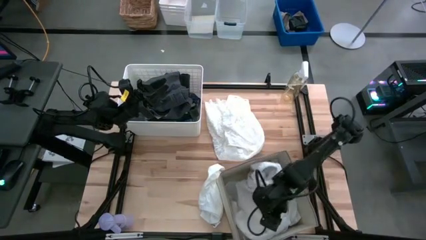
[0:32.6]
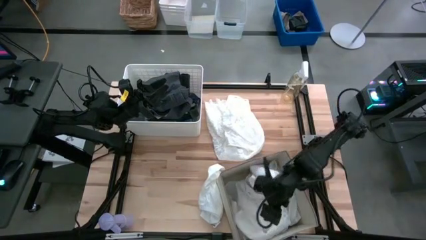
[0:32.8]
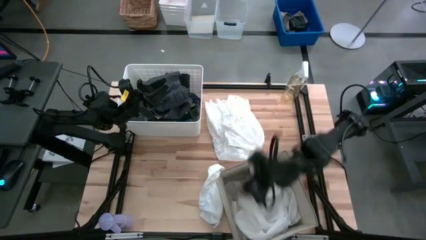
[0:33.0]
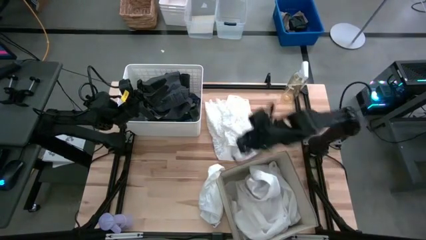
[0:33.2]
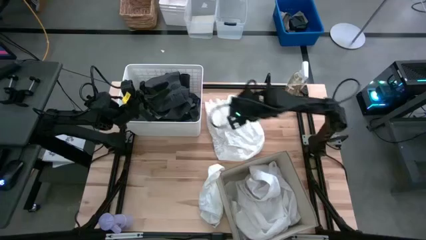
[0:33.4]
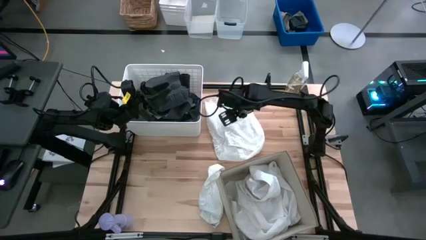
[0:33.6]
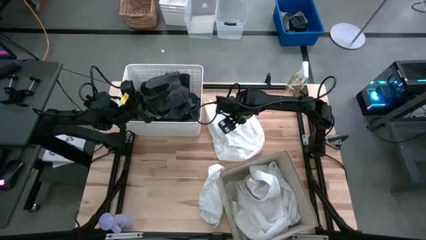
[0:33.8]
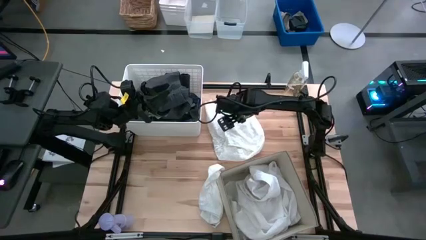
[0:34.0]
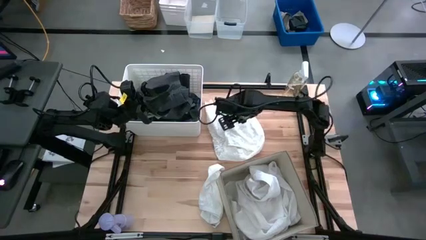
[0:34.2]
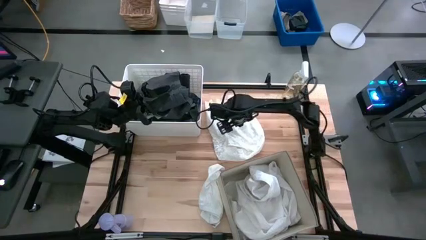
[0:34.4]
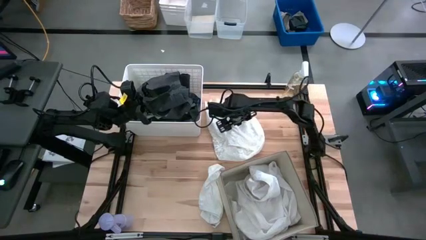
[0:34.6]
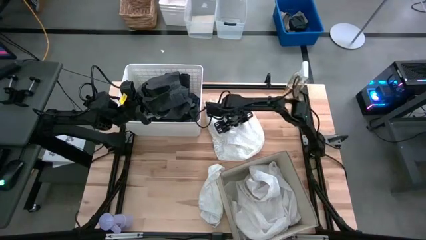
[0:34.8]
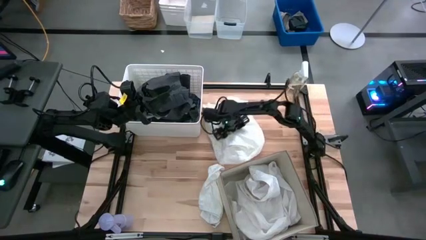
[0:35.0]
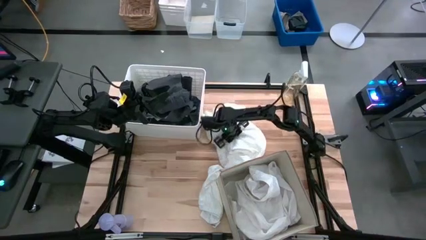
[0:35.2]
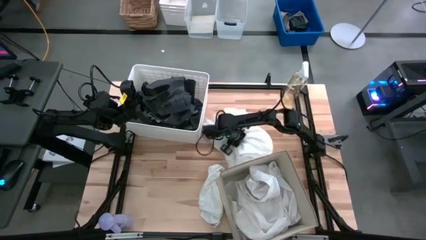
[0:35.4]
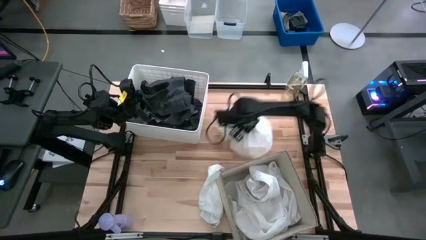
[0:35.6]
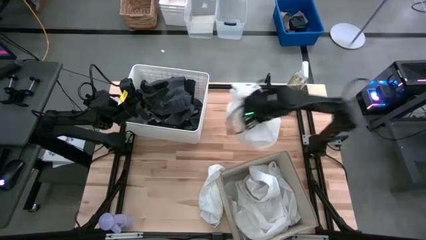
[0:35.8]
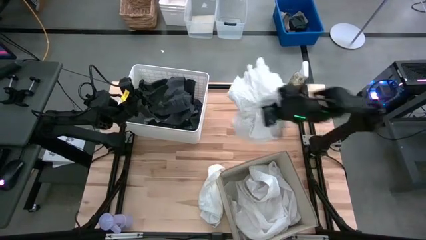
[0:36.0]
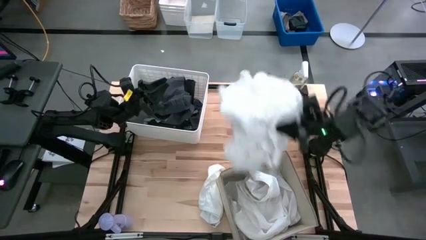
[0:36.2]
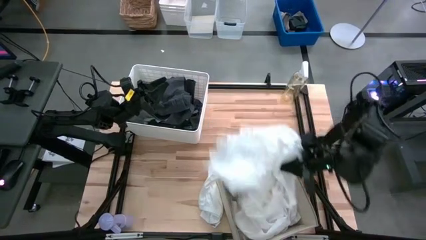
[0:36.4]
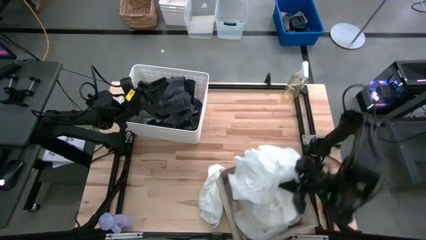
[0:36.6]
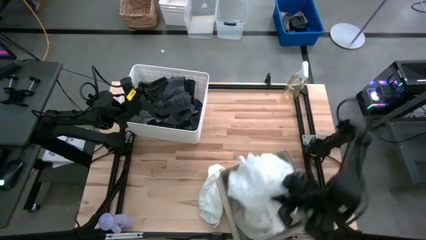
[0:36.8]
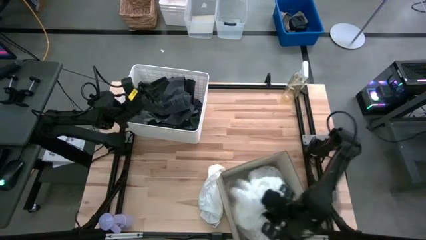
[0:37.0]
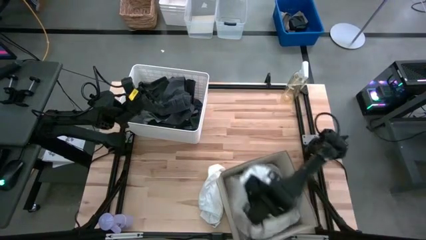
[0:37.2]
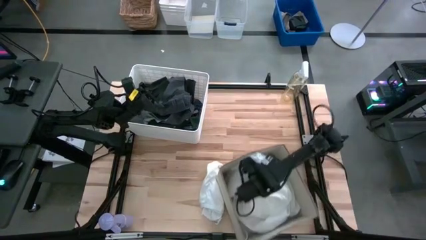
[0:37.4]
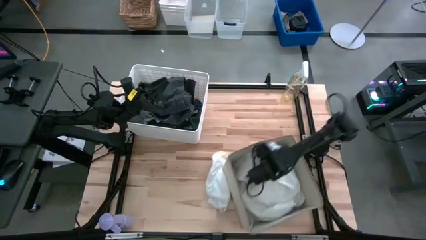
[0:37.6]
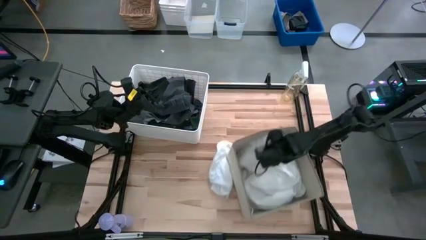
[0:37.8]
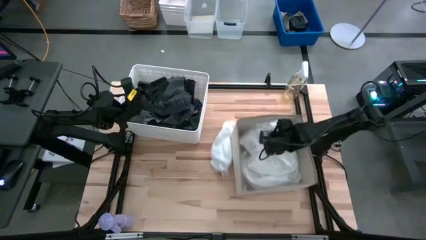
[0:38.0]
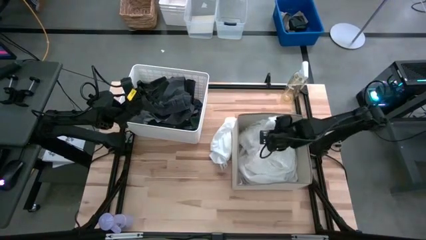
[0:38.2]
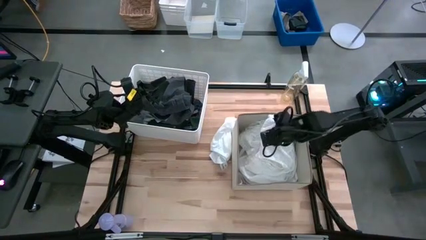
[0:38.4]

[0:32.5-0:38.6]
Task: Sort clothes
Put the white shirt into the bottom white laundry organizer

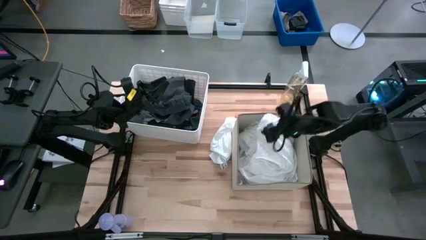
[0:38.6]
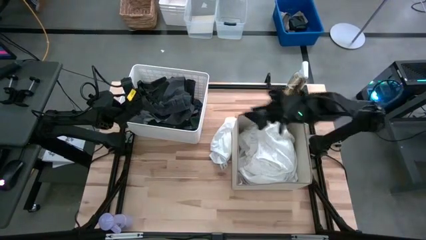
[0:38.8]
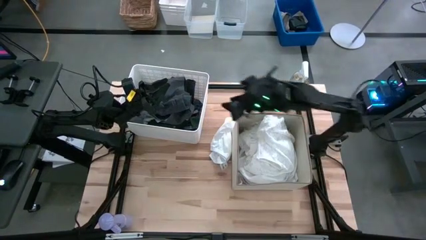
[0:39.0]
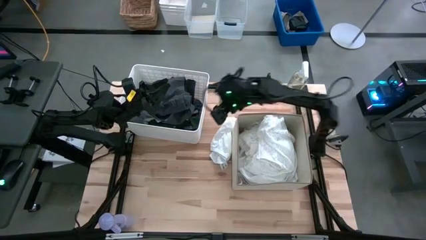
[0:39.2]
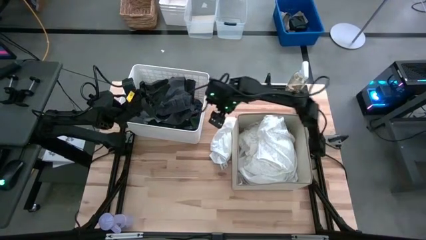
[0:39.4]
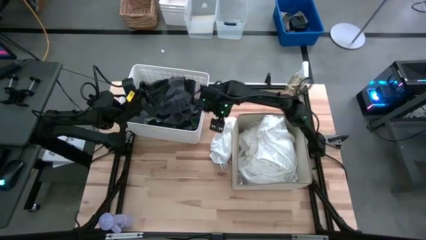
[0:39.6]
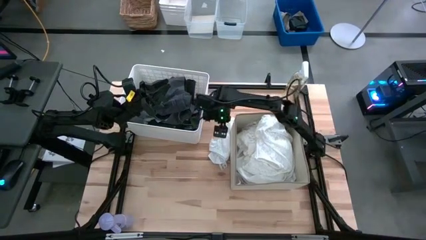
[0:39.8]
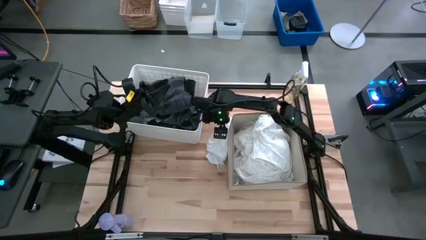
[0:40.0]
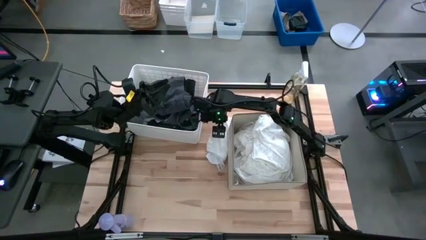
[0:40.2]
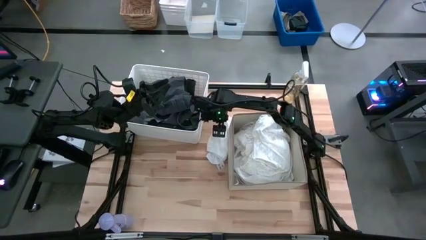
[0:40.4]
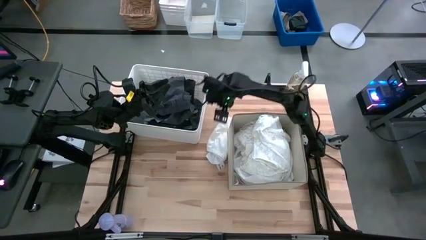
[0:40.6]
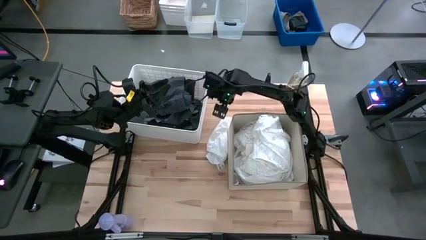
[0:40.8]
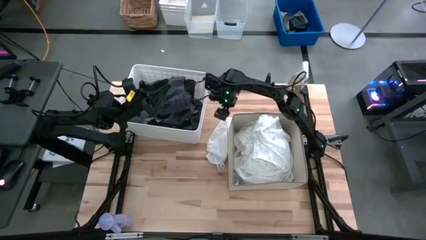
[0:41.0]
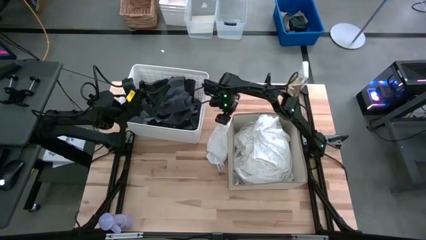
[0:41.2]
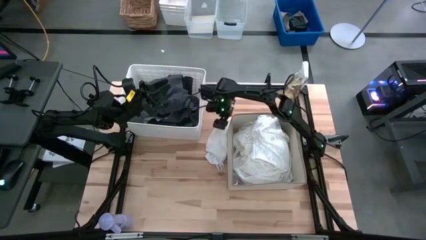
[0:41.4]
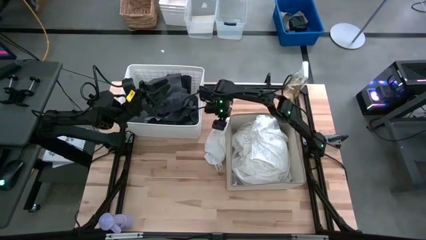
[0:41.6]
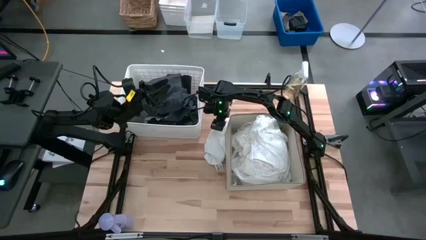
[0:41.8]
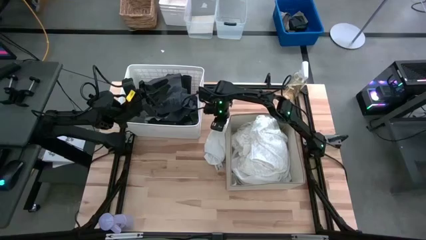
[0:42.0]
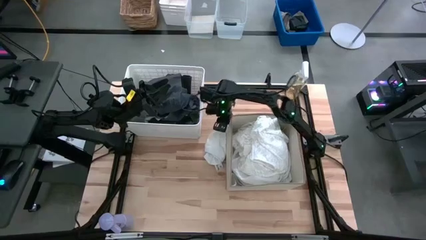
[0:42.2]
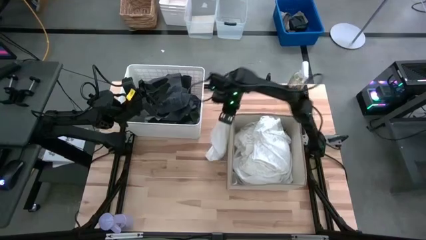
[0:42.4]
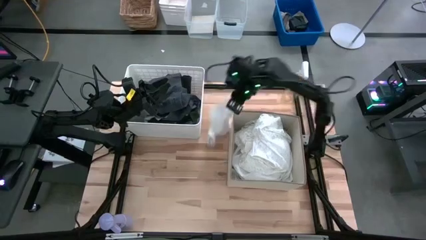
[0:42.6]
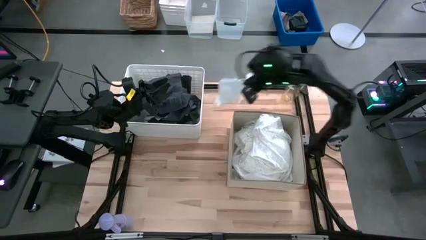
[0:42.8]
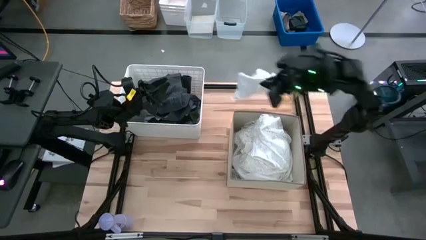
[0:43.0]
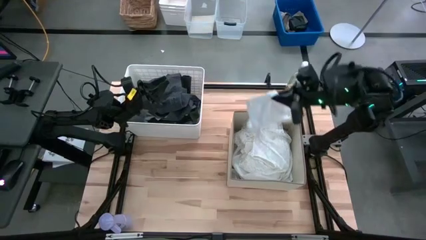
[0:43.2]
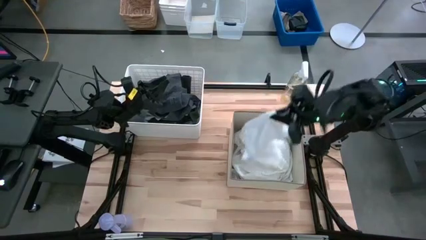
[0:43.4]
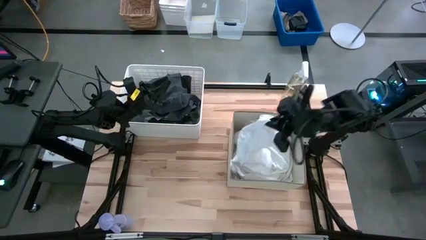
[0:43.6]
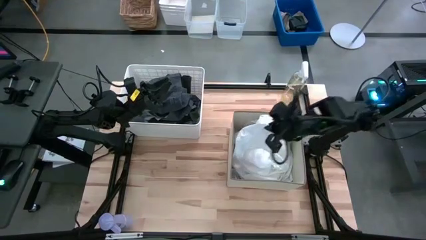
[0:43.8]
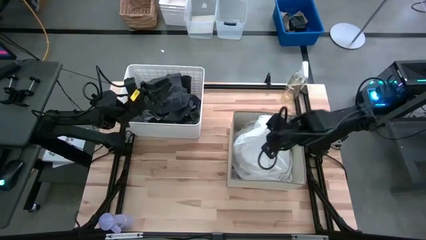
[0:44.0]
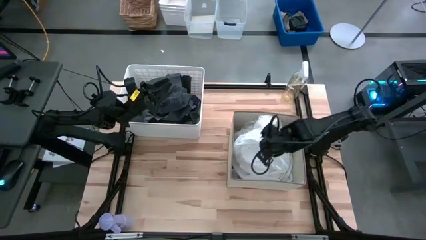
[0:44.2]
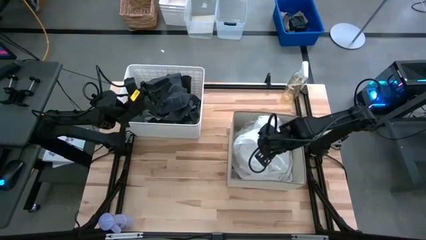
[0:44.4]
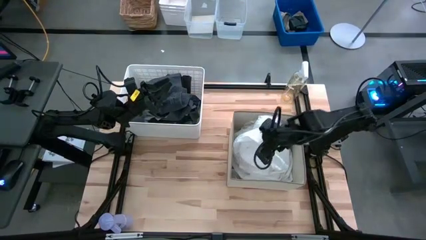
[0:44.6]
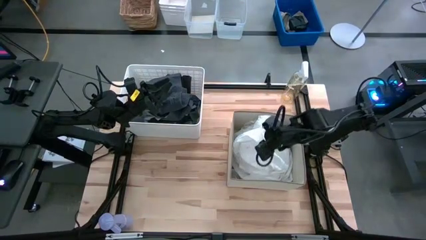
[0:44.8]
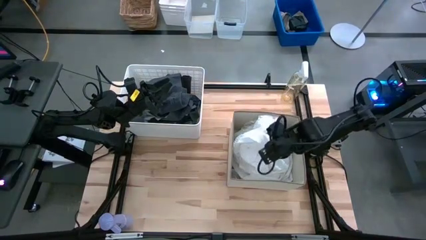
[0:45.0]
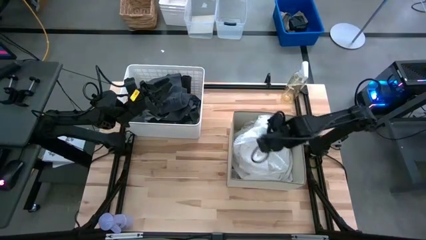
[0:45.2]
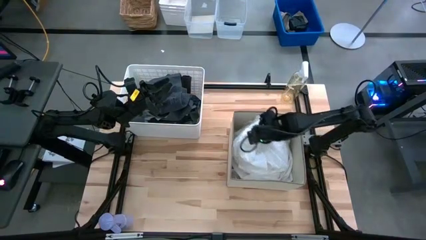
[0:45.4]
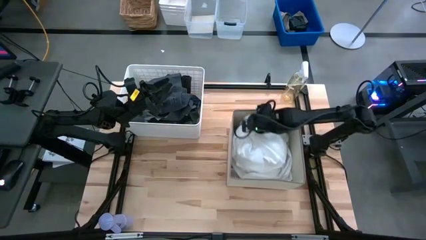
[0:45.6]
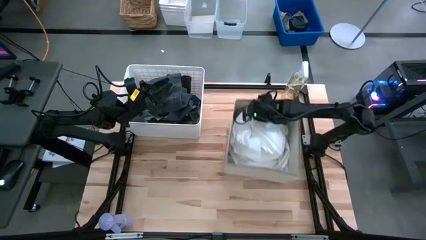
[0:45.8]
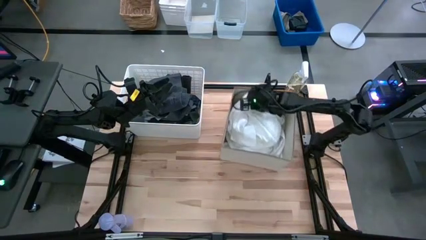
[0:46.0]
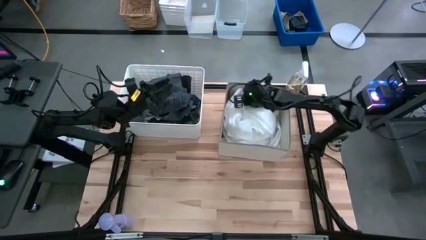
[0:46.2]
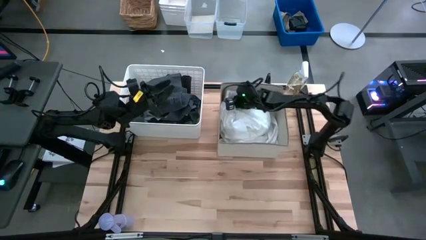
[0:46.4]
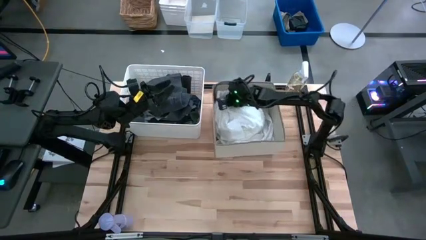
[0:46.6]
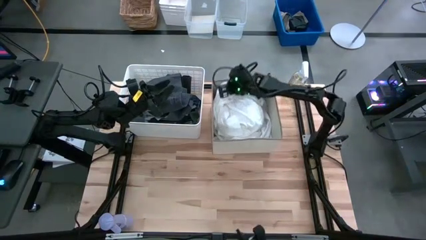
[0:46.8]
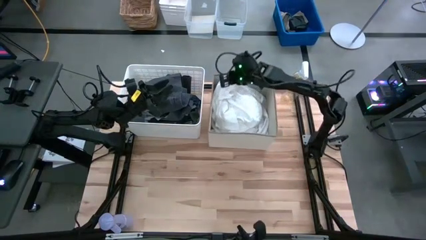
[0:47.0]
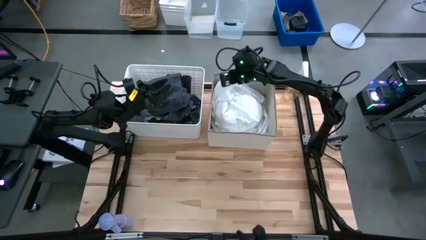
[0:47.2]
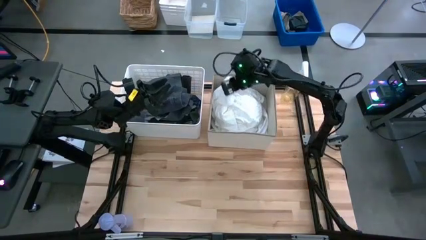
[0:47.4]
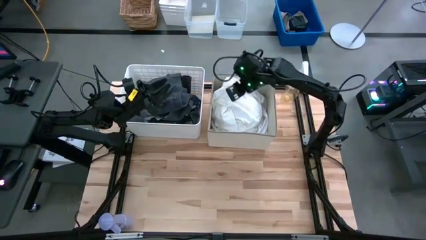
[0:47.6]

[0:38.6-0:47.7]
Put the white underwear into the bottom white laundry organizer

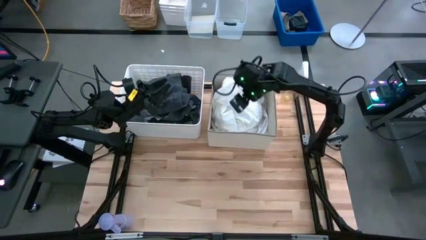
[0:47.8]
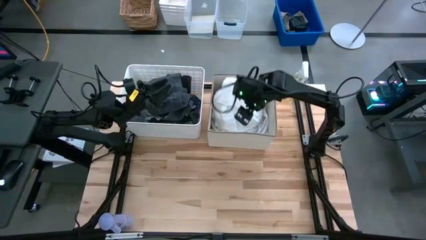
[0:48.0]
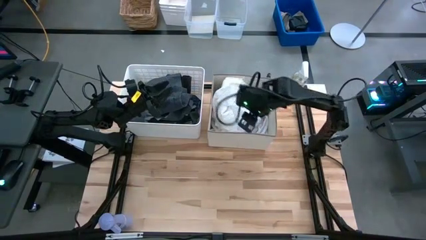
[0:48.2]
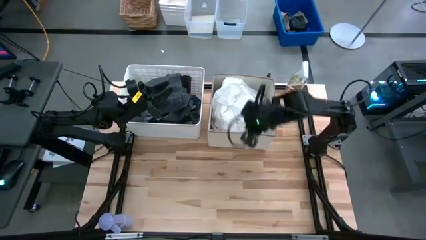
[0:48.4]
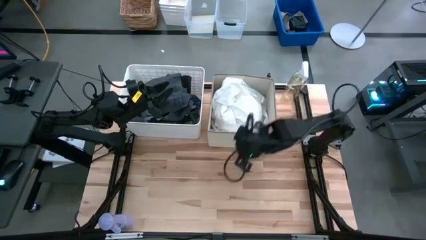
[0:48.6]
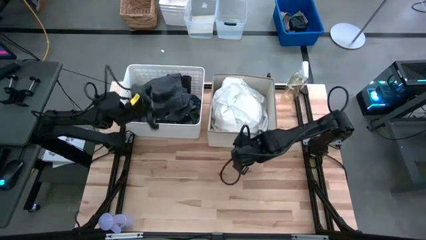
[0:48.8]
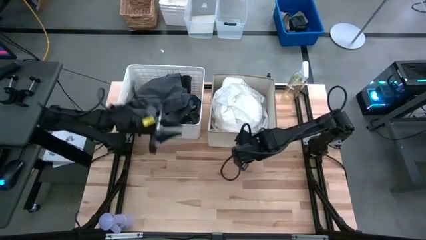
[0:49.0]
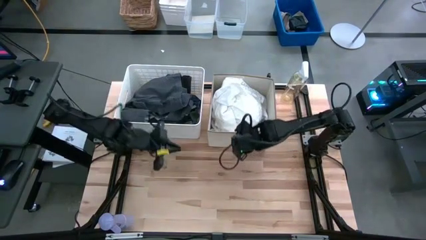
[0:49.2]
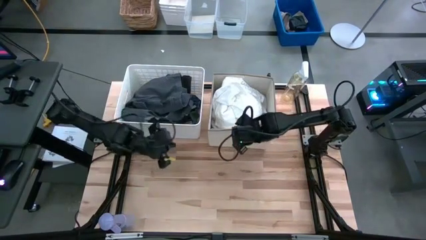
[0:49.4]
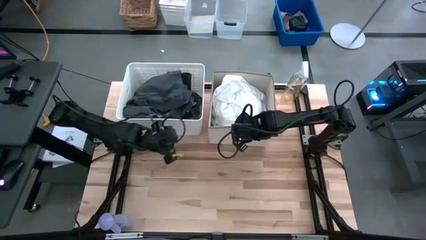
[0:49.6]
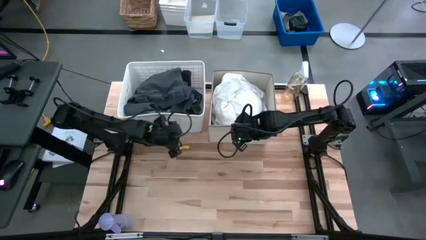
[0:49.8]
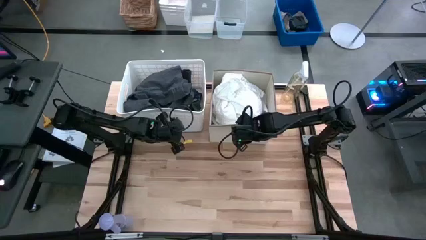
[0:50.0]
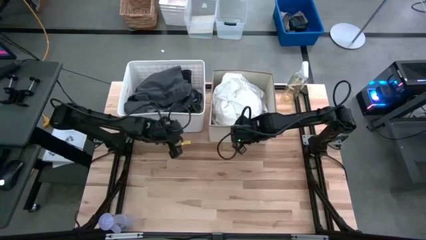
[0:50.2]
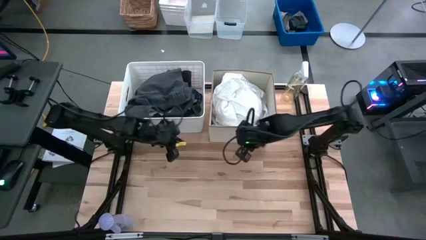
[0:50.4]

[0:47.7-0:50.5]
Adjust the white laundry organizers on the table
